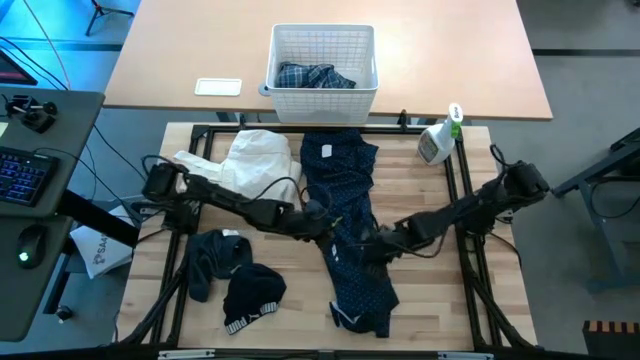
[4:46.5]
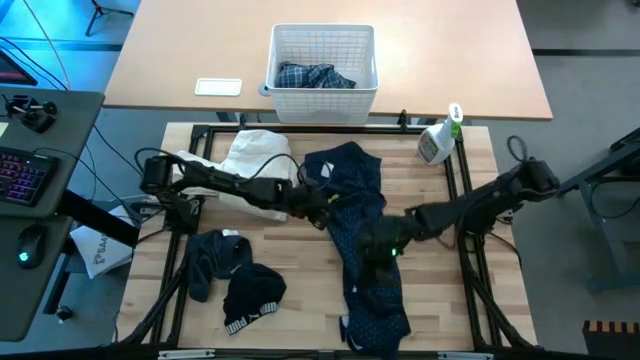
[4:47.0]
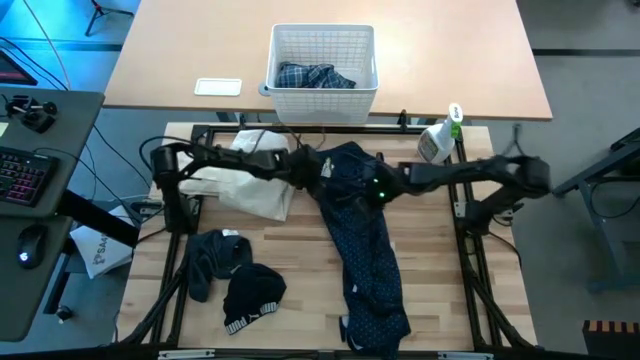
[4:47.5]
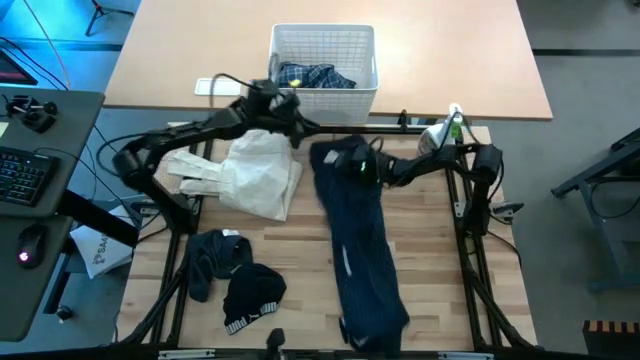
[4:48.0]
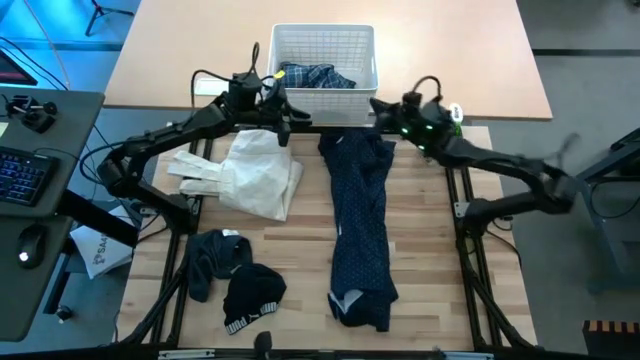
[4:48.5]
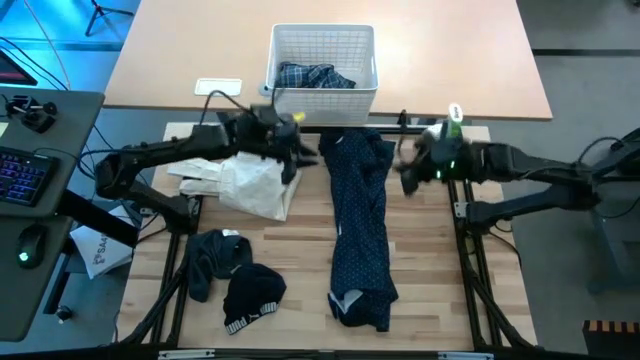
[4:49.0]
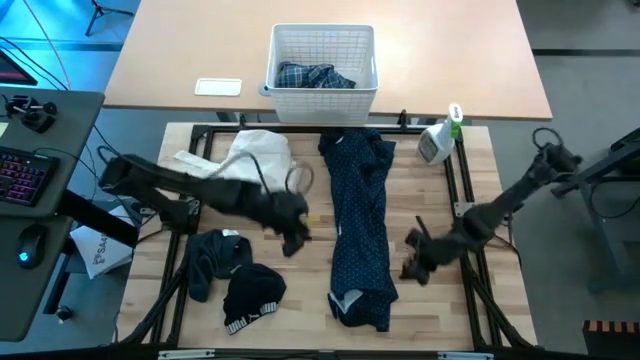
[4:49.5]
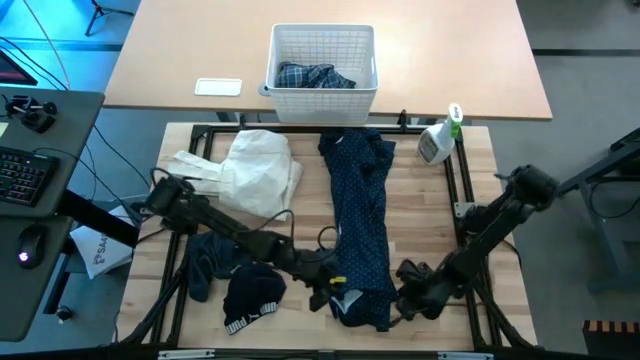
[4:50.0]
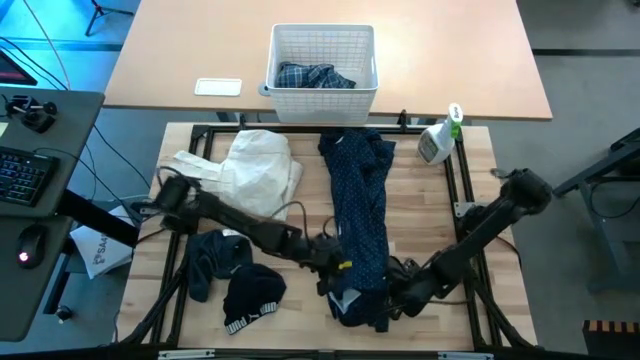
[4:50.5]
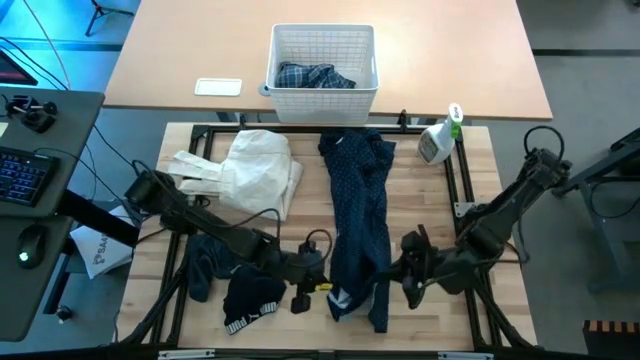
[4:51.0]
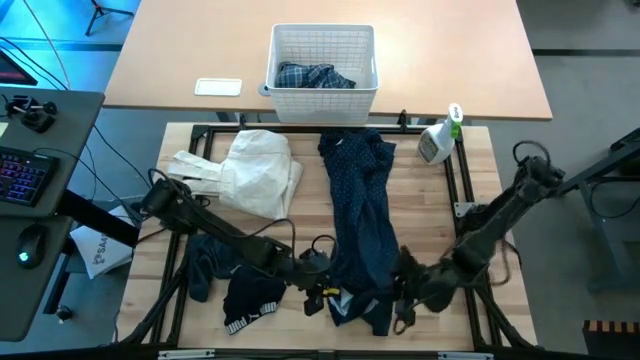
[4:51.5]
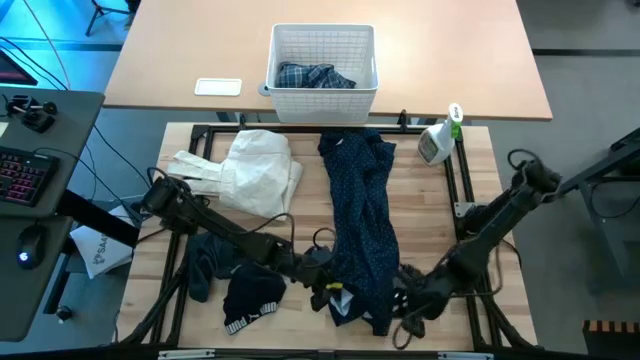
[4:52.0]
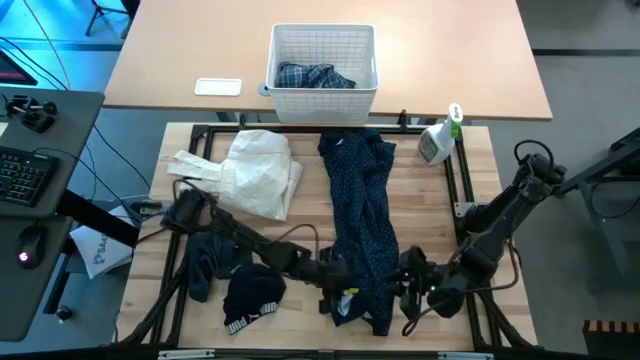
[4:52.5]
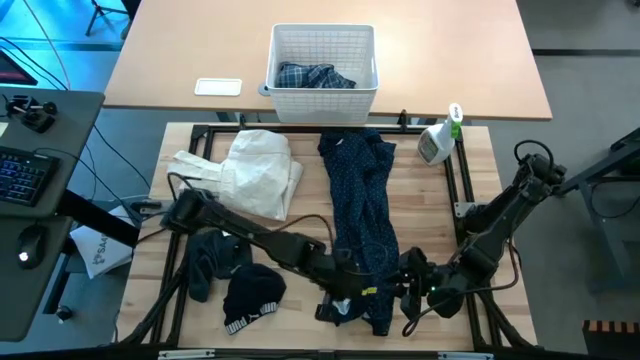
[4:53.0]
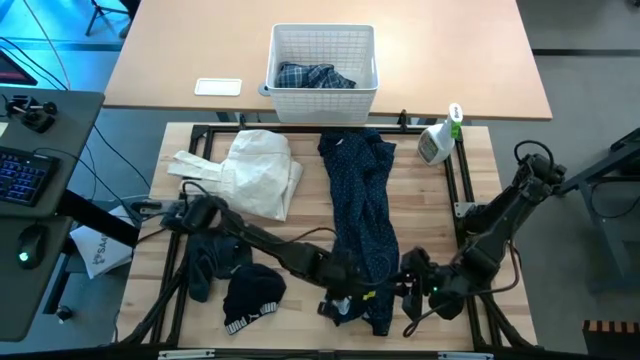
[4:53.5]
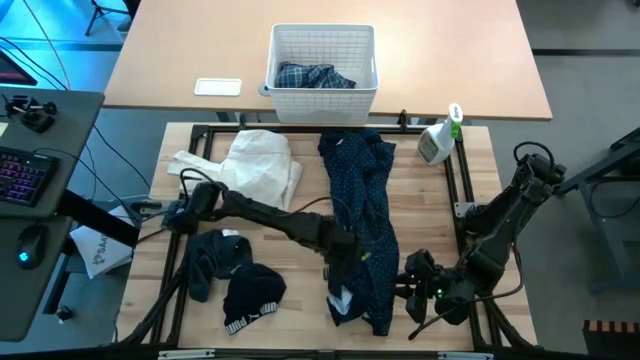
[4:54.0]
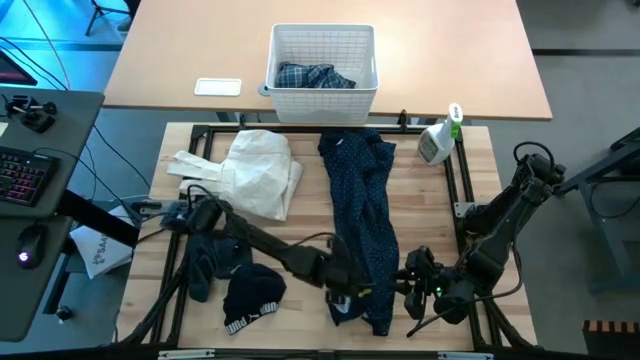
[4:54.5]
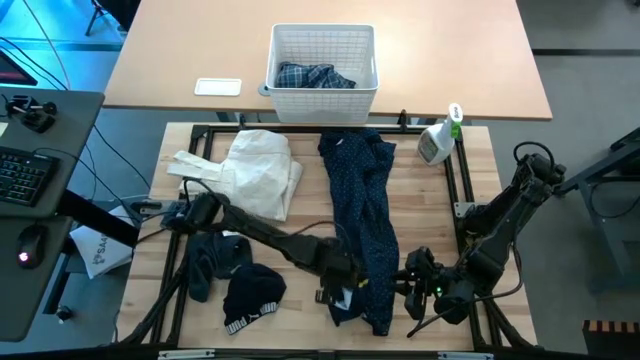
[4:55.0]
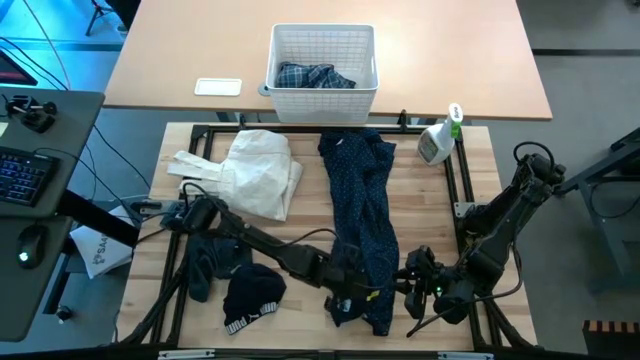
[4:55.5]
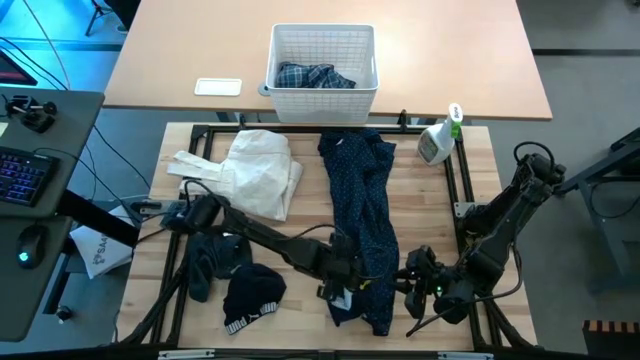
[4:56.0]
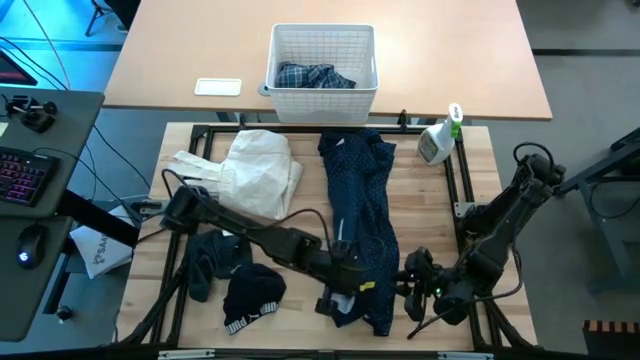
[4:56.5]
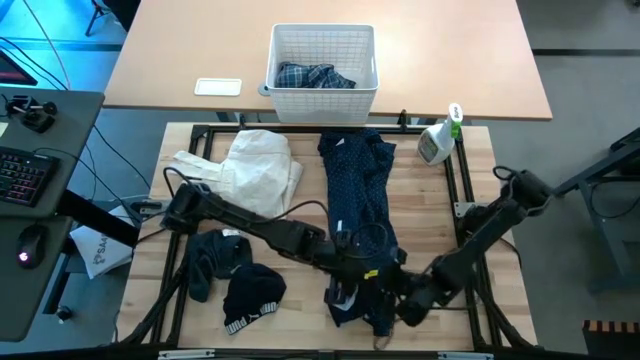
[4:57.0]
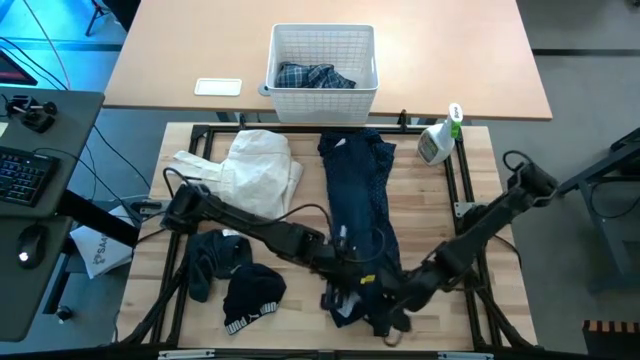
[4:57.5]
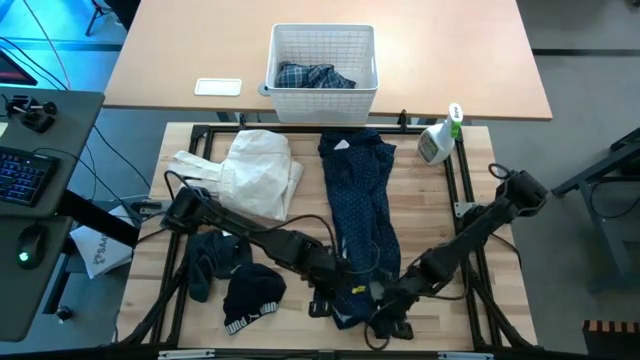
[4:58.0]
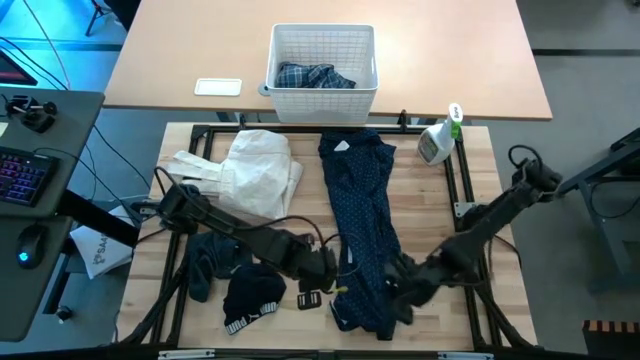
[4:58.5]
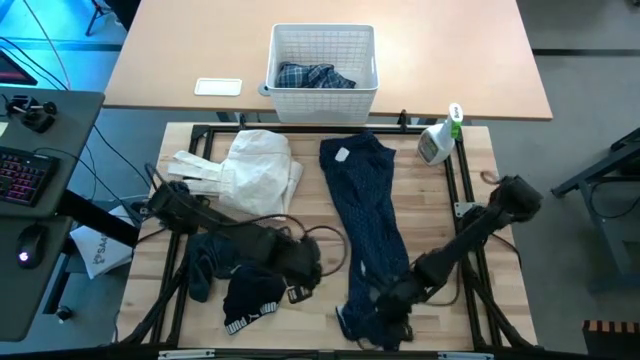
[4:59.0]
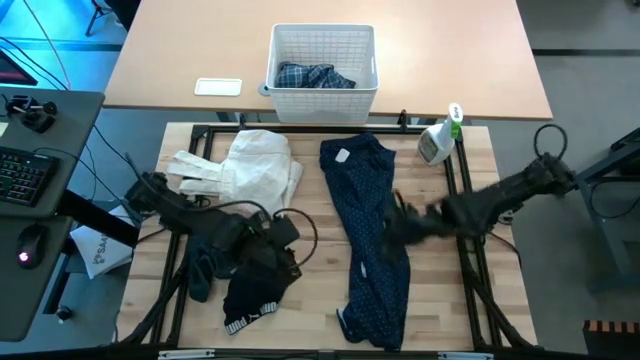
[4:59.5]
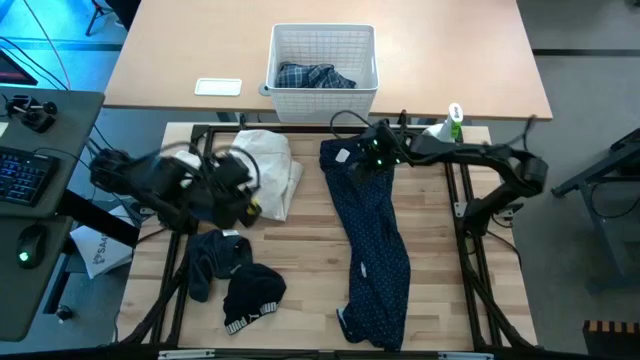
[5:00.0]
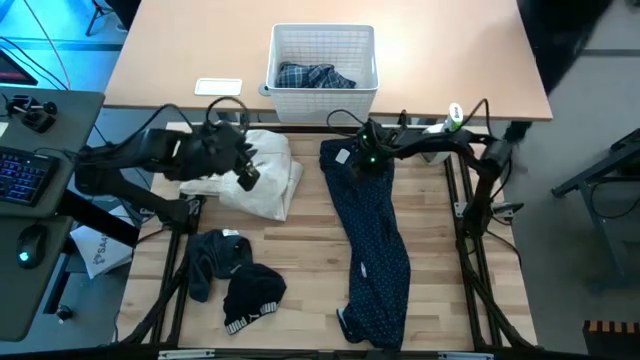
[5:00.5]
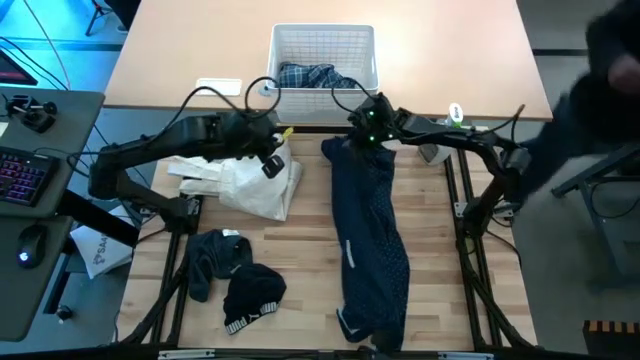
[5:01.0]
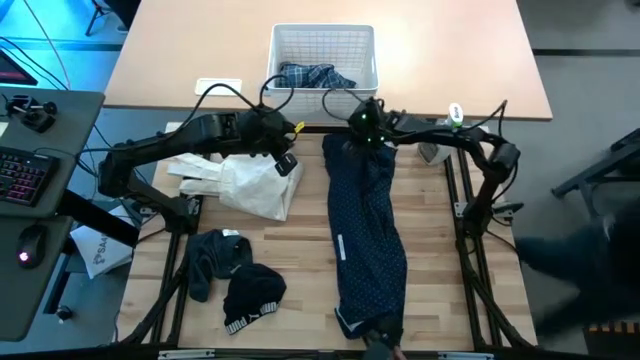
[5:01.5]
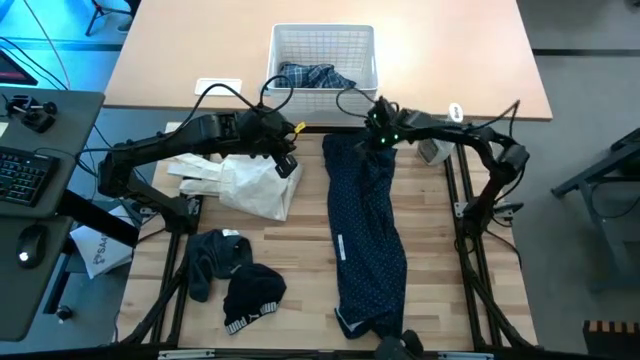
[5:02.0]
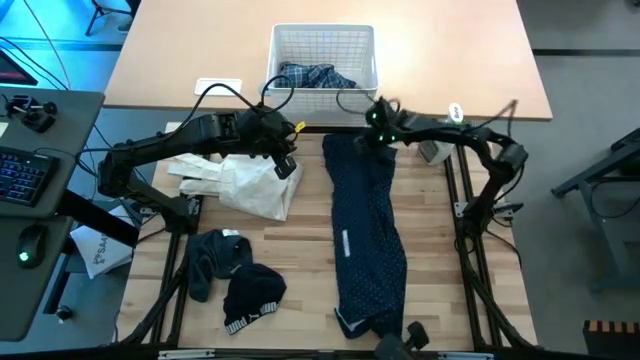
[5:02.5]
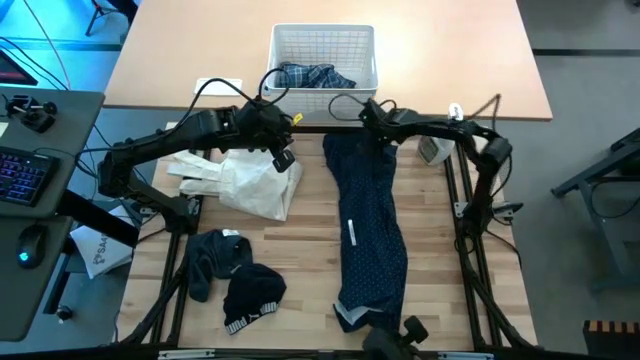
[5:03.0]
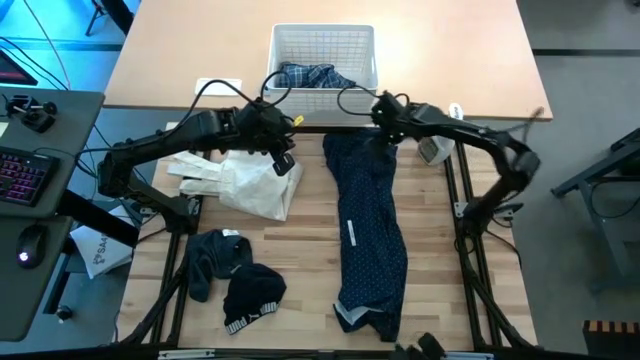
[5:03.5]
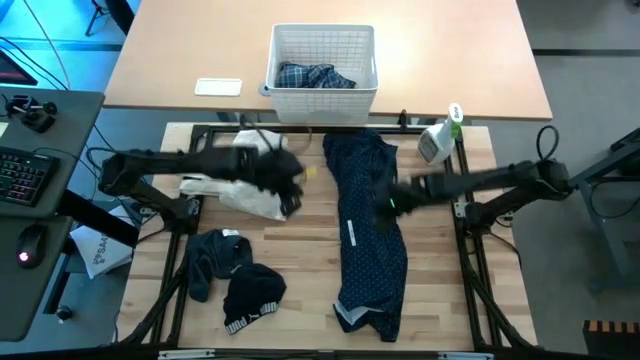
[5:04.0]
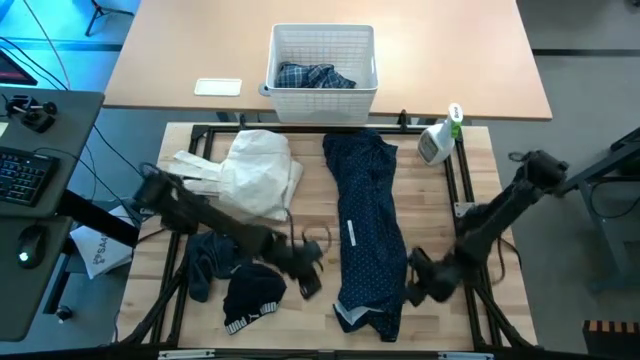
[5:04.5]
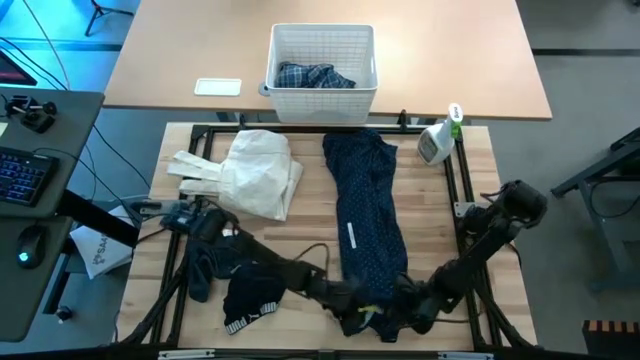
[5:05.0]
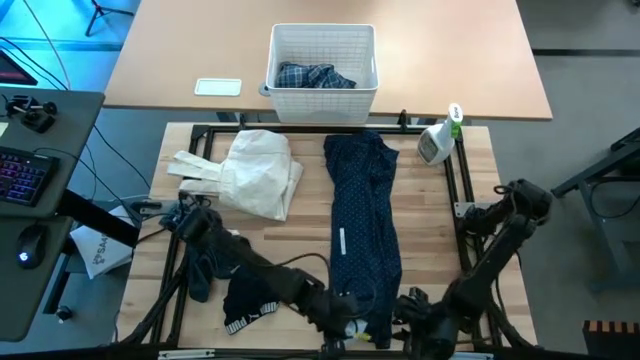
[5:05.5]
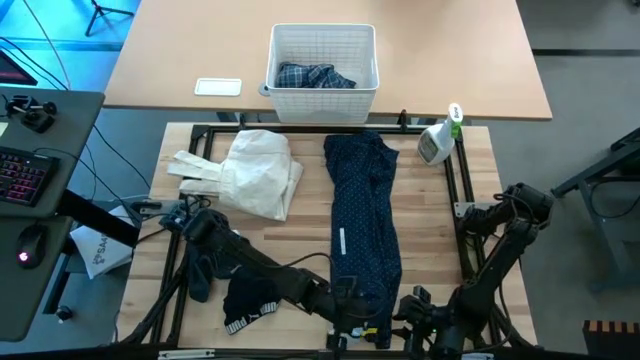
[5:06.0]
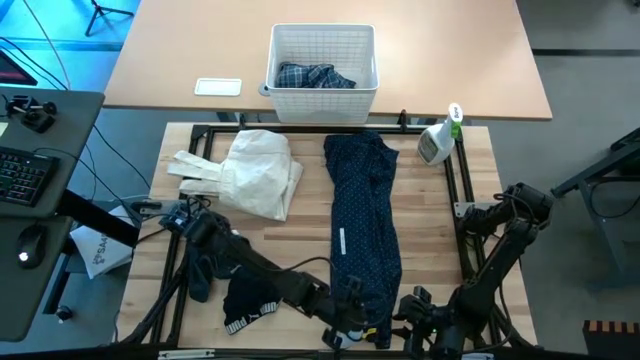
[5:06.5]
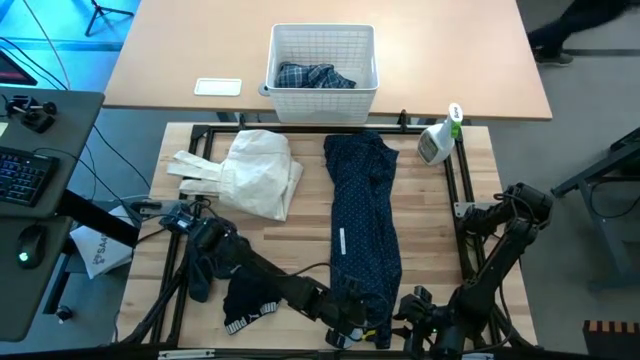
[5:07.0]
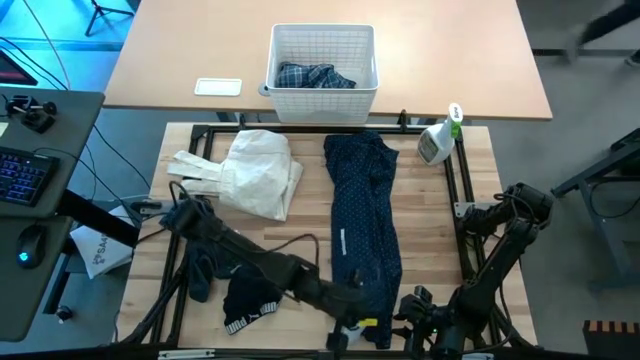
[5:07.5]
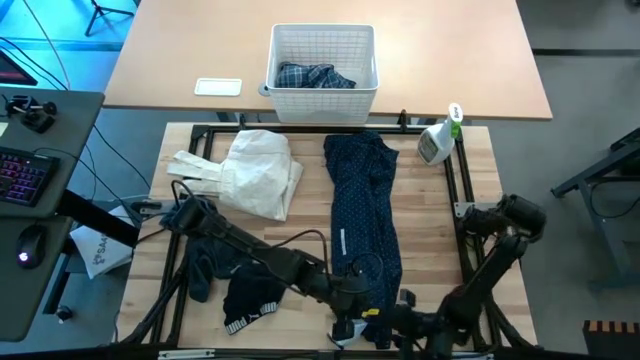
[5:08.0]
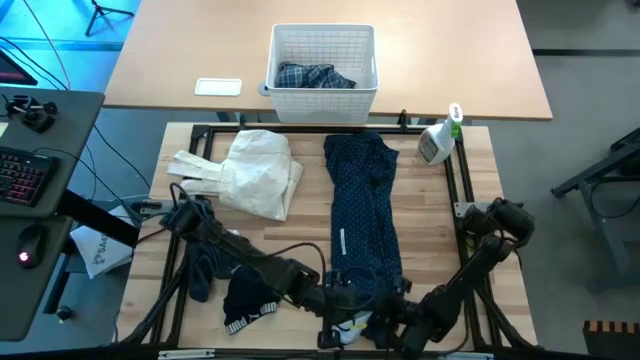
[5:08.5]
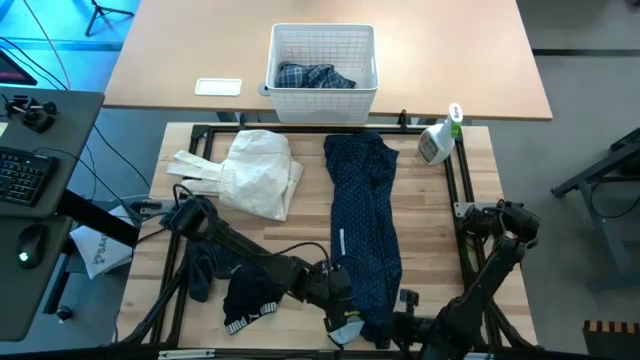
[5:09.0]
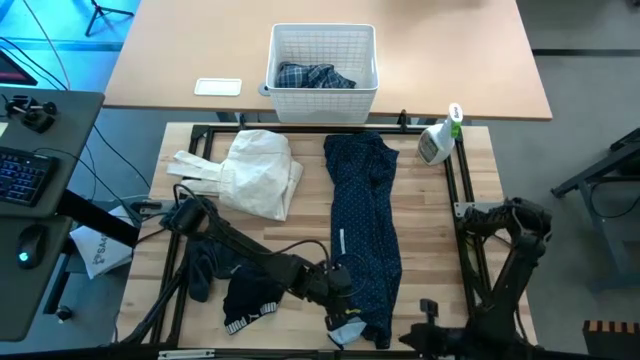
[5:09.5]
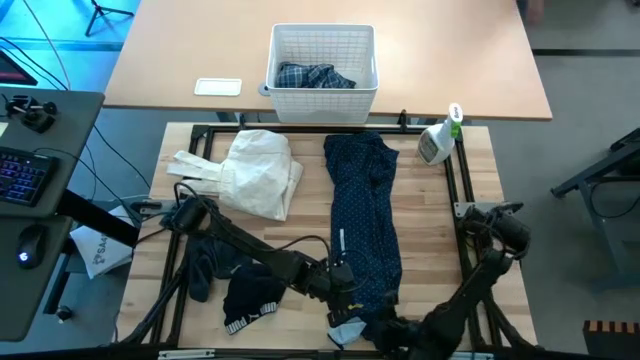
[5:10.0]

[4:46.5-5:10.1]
Task: Fold laundry
Fold the navy blue polo shirt
